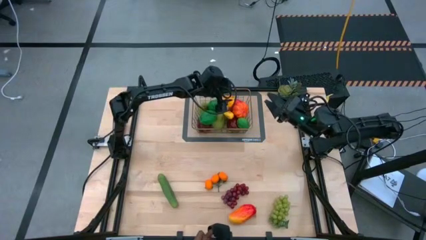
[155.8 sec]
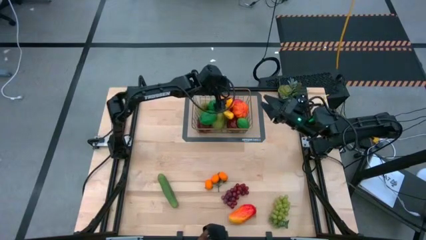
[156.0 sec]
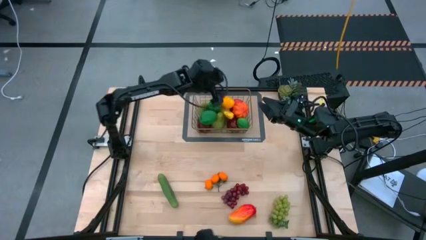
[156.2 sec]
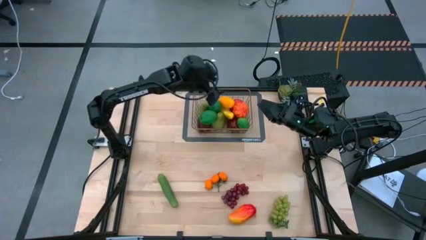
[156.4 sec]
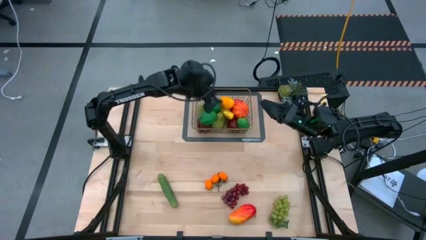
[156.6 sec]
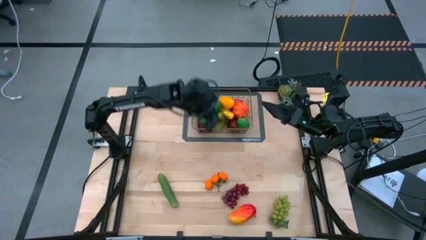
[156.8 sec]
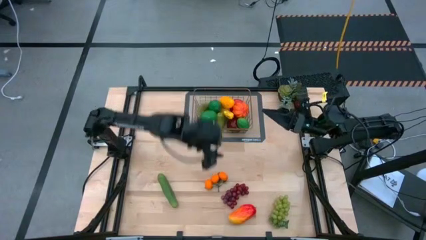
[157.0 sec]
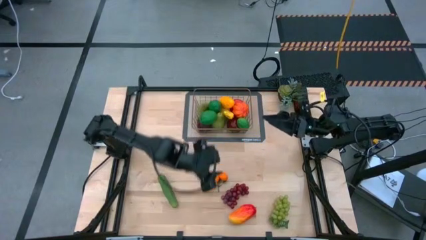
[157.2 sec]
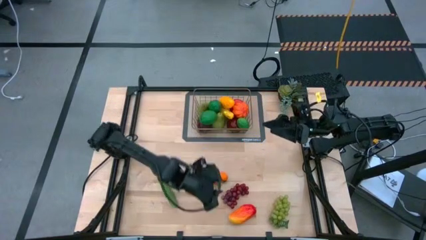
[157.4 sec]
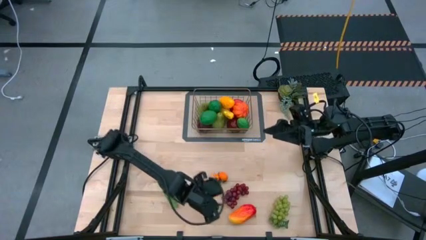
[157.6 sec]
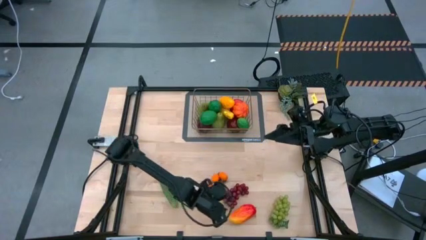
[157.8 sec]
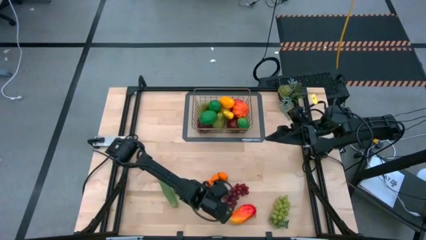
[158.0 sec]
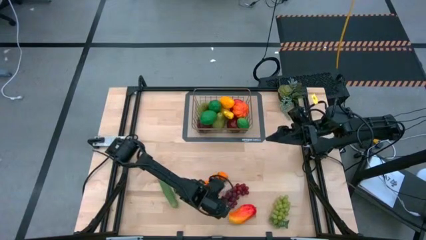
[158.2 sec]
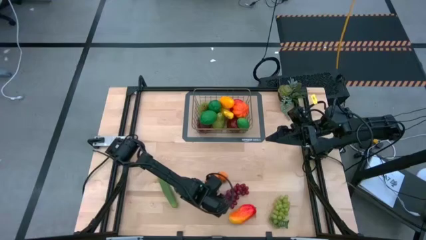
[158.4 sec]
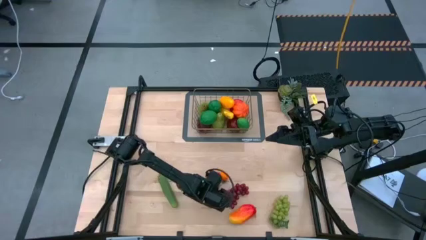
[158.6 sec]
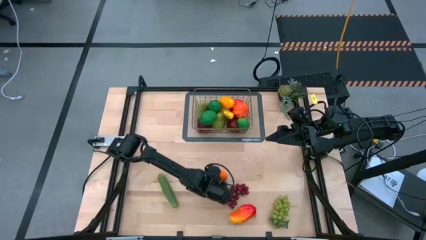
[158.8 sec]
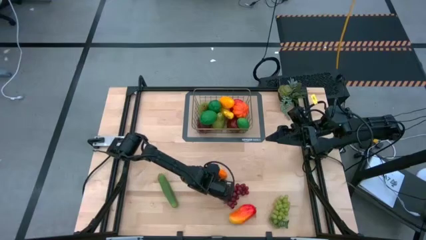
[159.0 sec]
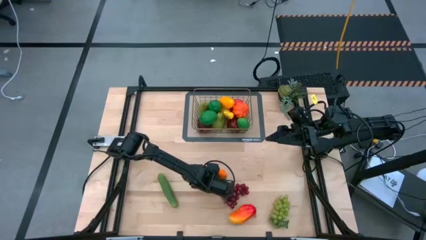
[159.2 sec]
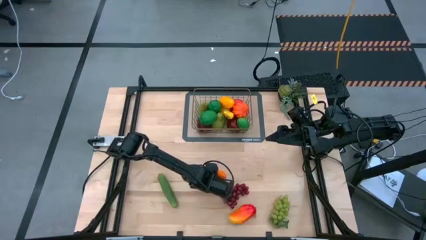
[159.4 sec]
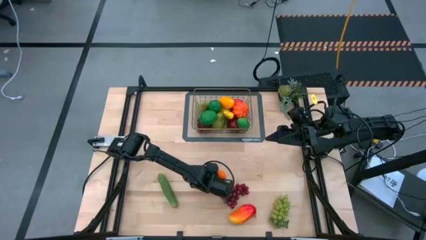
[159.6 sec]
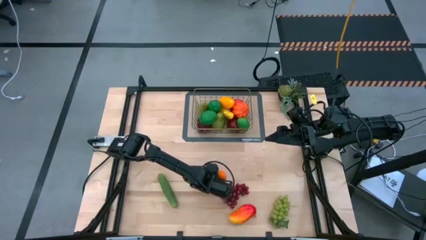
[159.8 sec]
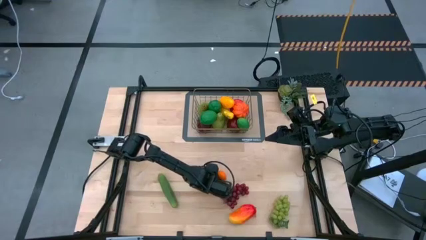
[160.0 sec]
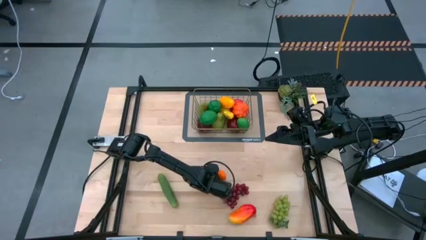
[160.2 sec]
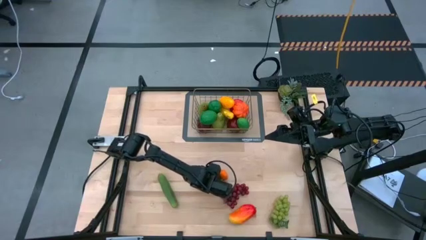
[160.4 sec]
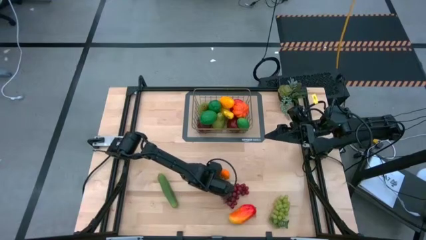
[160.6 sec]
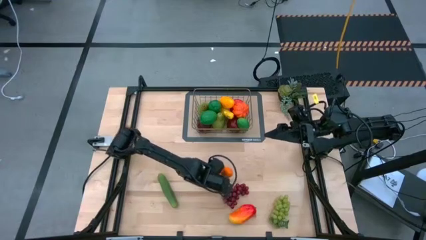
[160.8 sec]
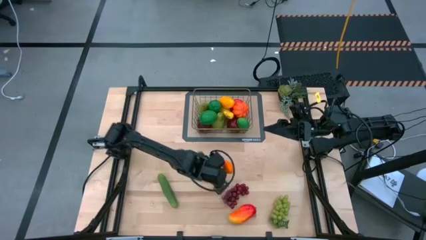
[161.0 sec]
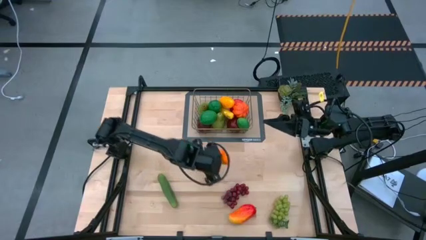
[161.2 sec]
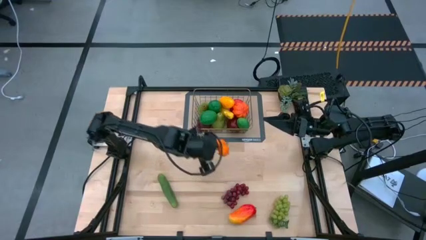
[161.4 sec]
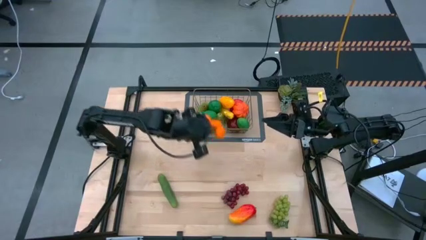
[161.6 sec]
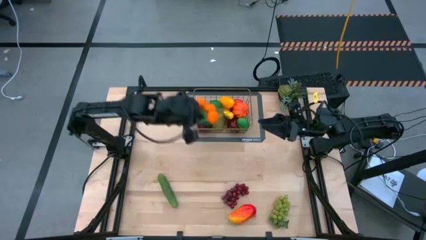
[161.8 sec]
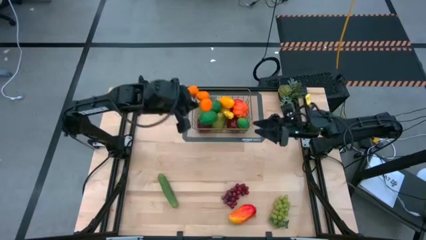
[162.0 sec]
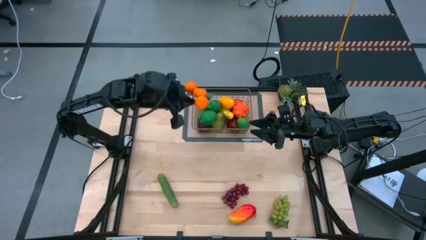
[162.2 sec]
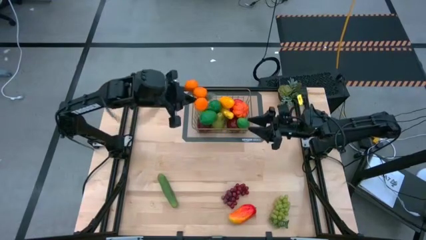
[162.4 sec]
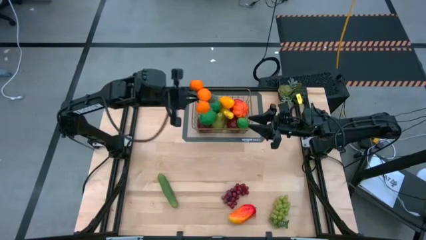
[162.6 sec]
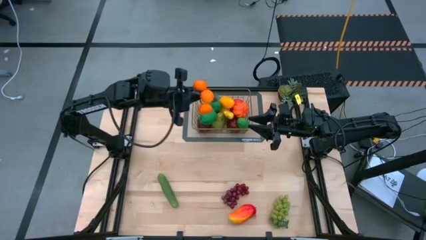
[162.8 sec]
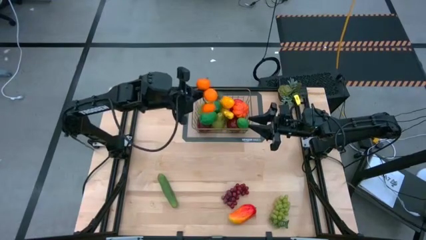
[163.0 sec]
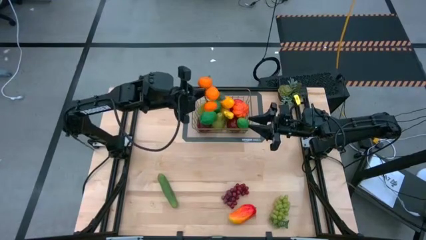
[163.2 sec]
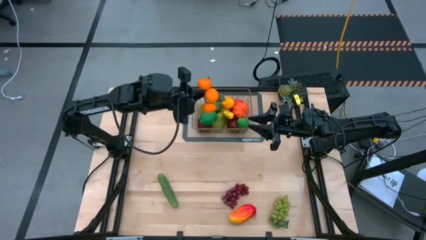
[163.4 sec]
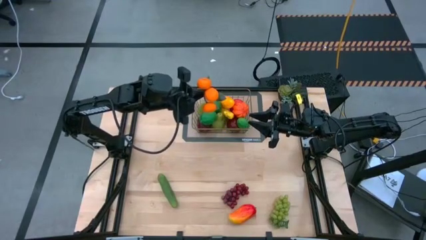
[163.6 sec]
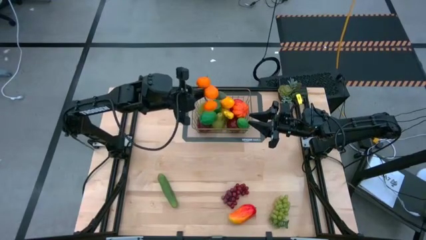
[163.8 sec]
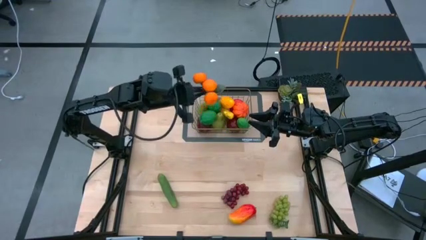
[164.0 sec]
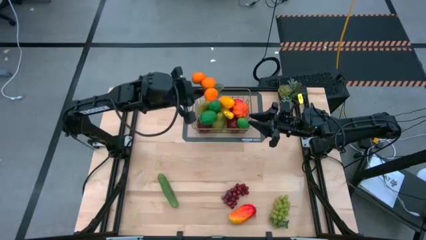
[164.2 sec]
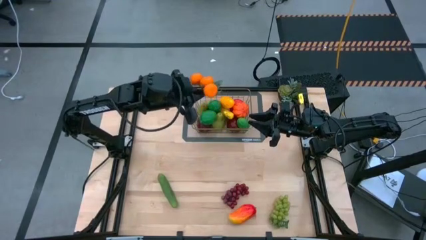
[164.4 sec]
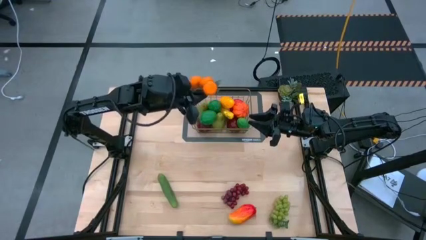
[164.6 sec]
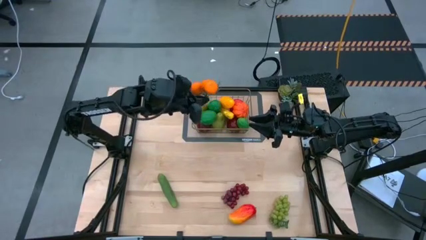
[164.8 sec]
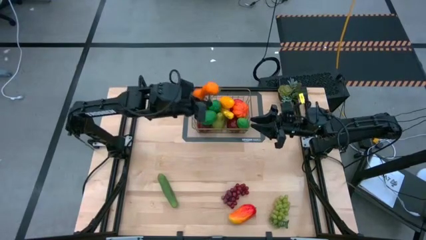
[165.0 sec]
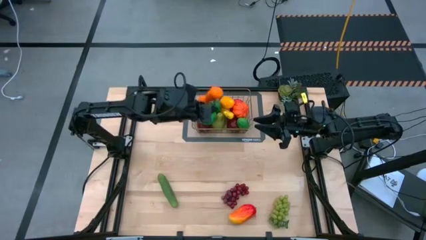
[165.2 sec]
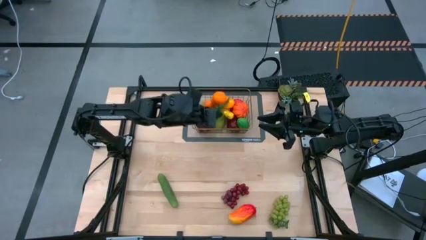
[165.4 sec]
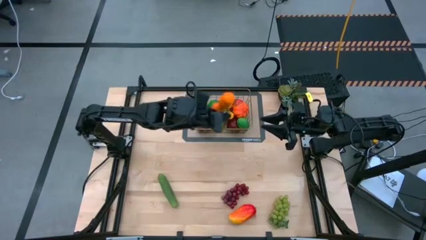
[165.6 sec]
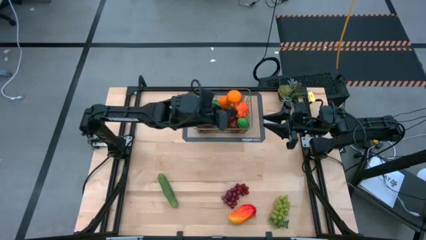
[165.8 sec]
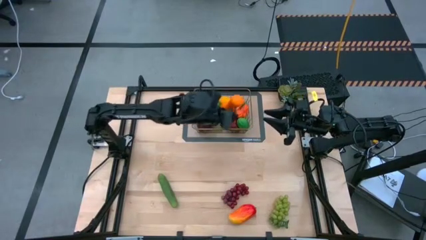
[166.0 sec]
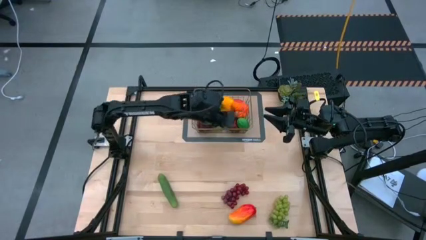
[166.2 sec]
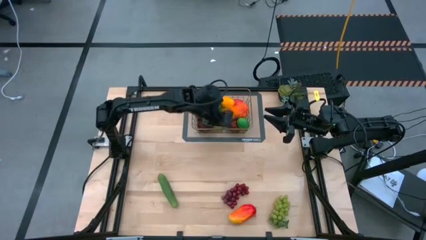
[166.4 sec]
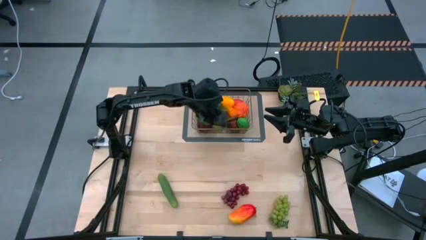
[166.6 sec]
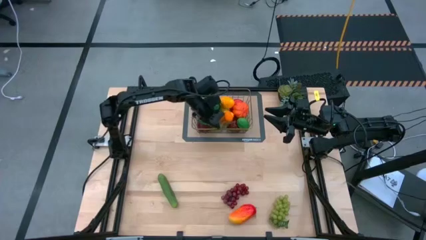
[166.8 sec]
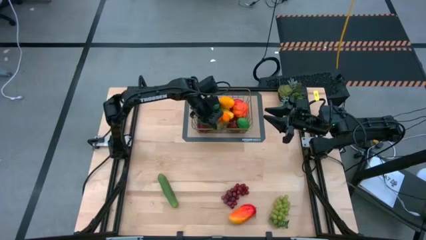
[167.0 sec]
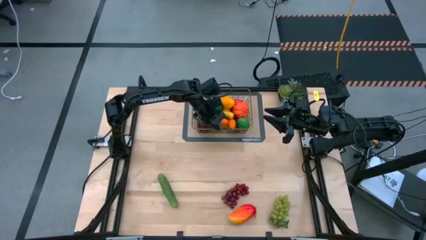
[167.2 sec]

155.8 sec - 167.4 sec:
Task: Build produce basket
Put the orange tangerines into the brown wire basket

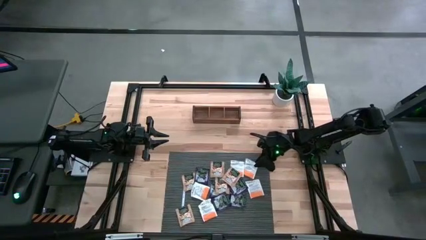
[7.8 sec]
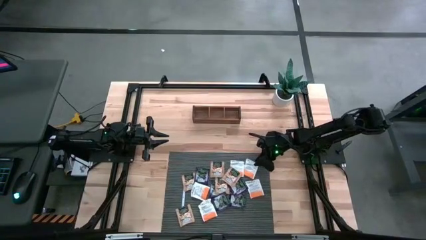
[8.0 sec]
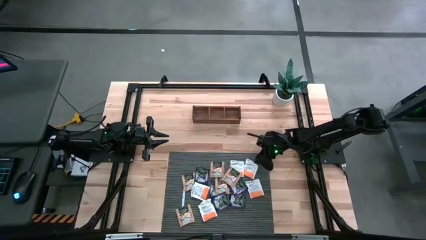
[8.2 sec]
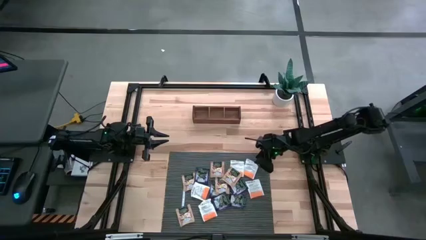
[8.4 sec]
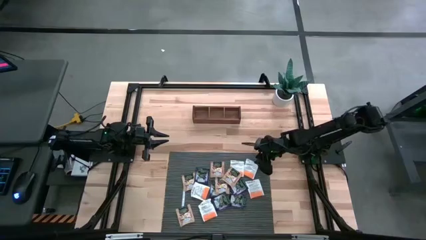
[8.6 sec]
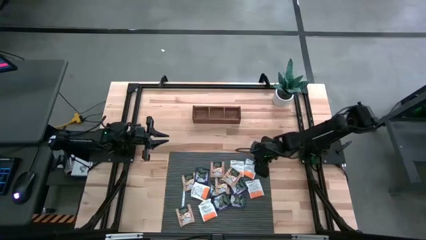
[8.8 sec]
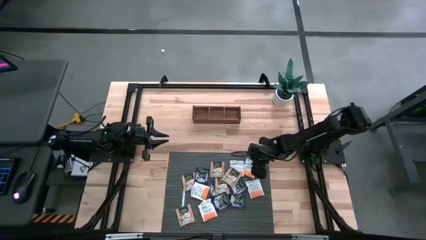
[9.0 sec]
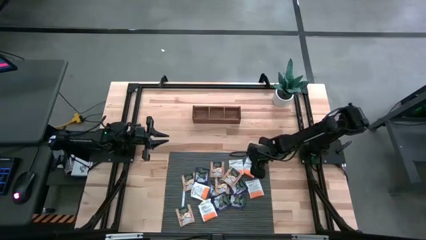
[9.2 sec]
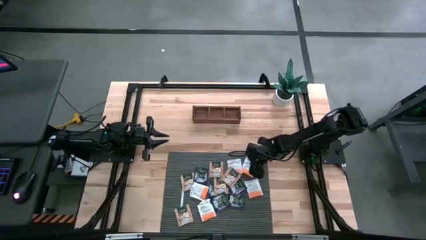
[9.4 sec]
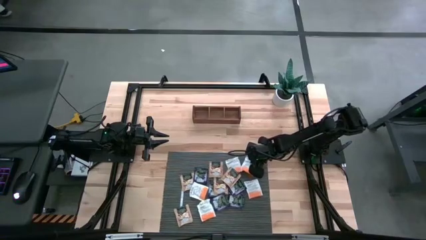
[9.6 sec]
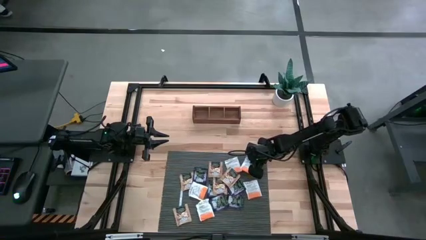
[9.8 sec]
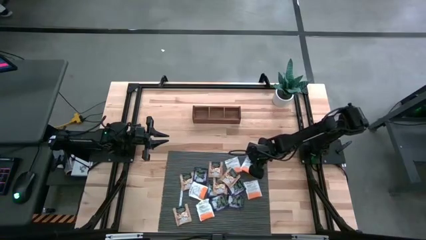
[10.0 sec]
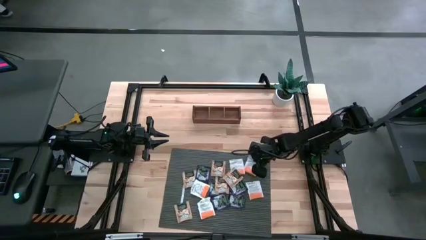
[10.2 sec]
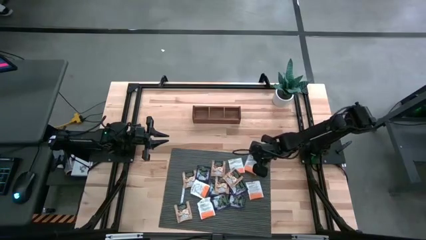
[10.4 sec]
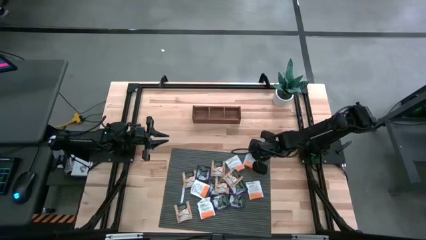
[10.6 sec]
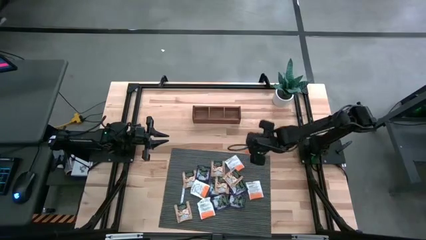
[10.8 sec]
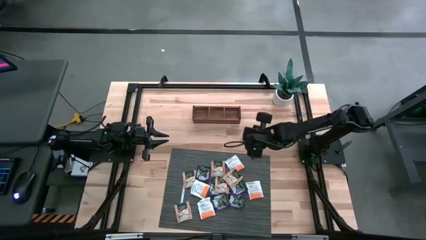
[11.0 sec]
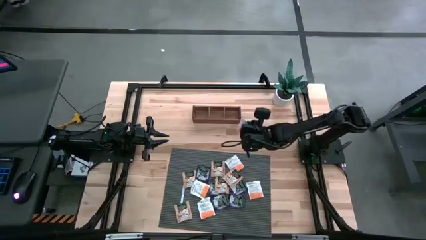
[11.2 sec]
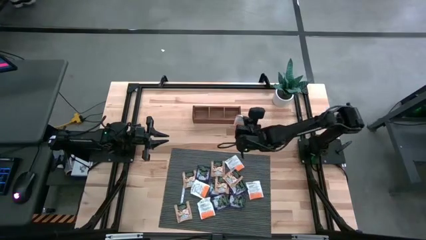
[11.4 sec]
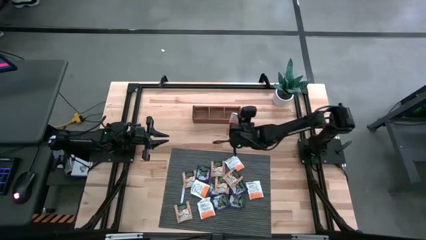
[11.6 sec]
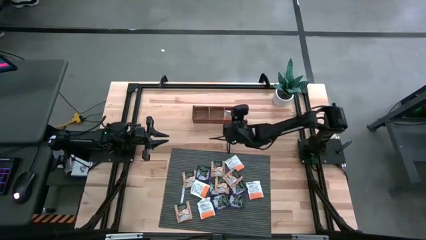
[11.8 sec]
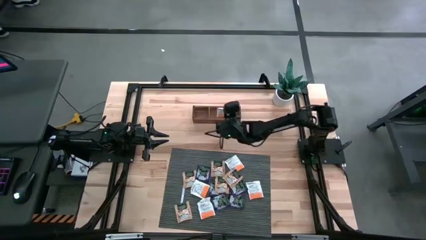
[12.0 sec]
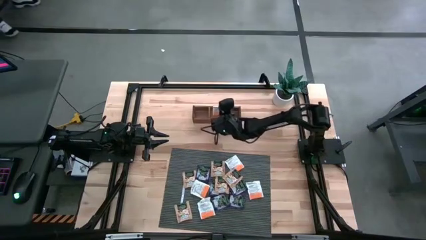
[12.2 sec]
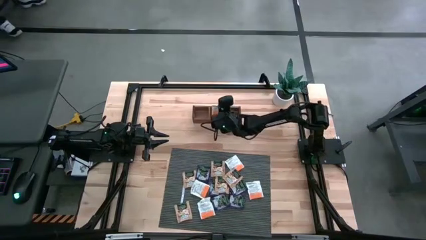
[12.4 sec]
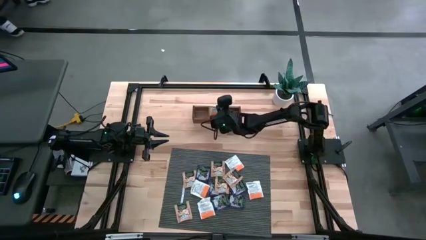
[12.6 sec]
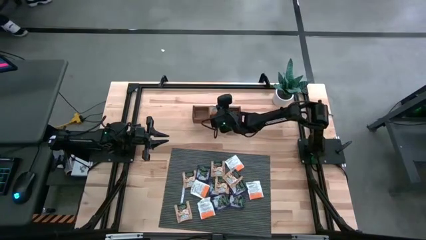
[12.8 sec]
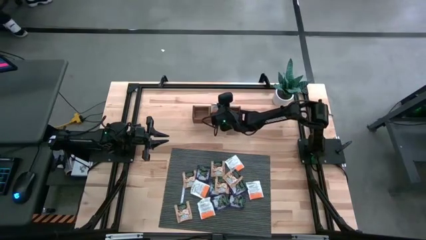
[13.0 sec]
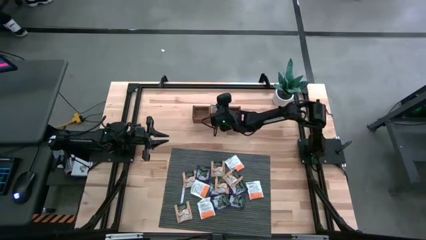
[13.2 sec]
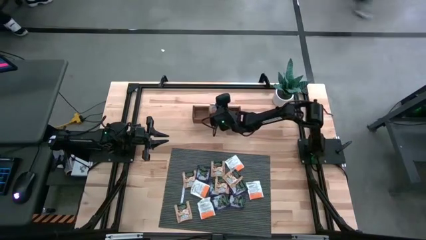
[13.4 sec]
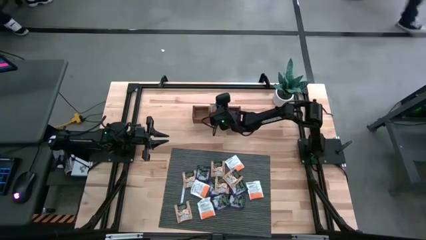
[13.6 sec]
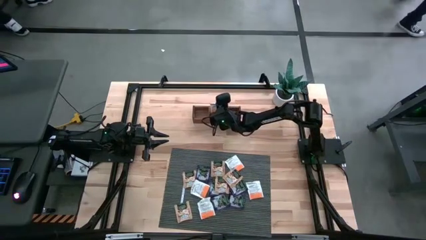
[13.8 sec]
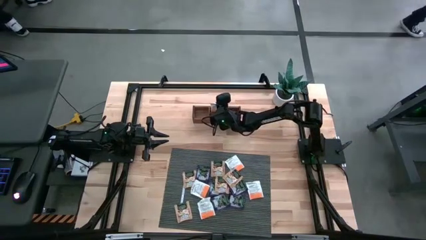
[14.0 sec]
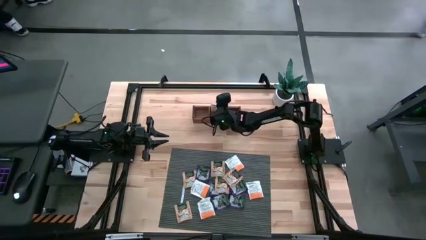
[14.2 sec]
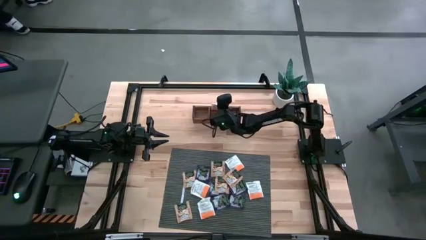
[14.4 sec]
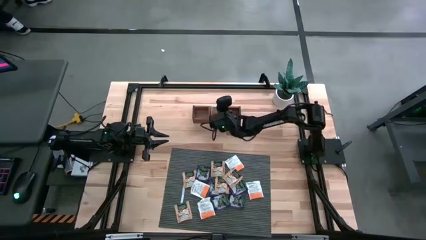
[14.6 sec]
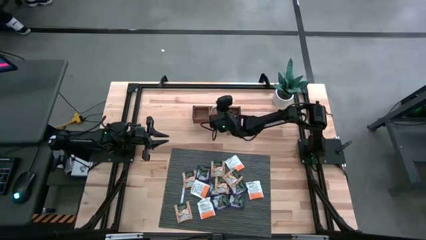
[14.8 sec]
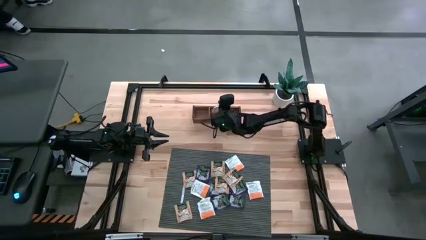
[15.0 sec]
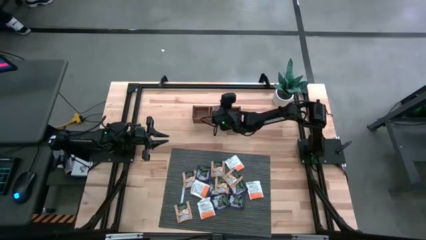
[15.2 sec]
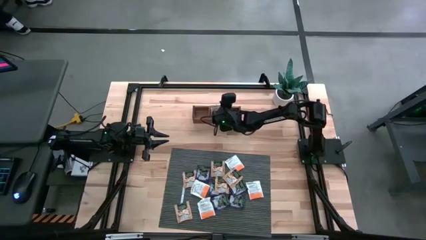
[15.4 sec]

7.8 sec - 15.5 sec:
Task: Pick & Place Tea
Put the orange tea bag into the middle compartment of the wooden organizer
